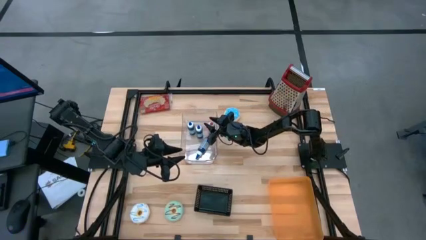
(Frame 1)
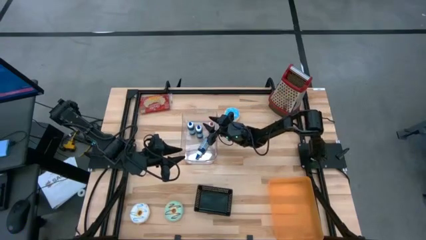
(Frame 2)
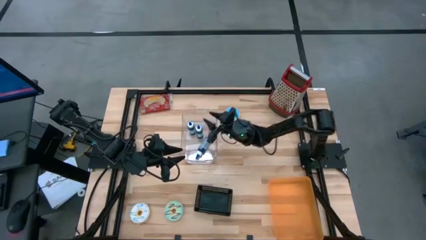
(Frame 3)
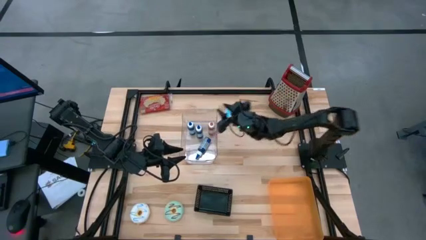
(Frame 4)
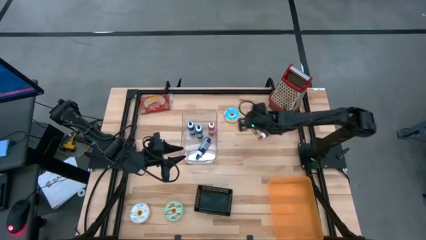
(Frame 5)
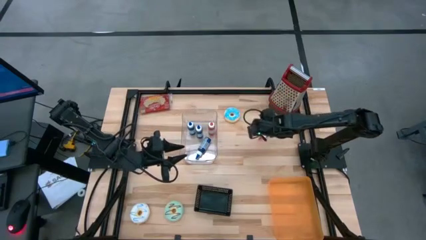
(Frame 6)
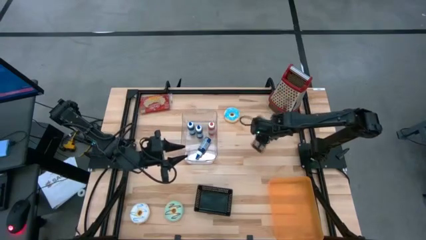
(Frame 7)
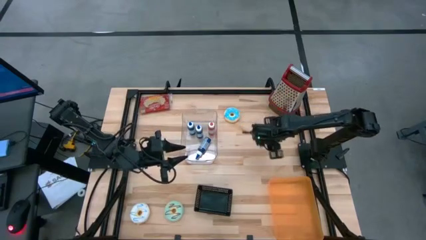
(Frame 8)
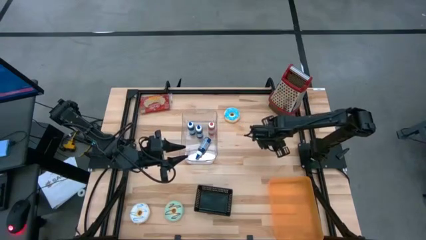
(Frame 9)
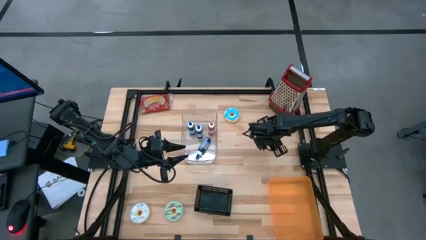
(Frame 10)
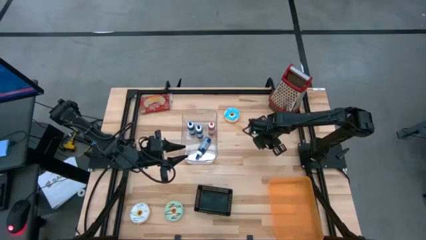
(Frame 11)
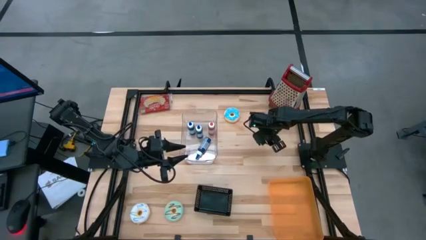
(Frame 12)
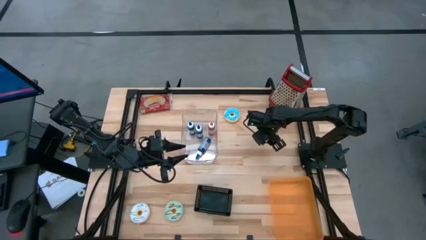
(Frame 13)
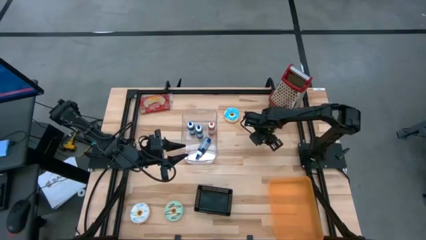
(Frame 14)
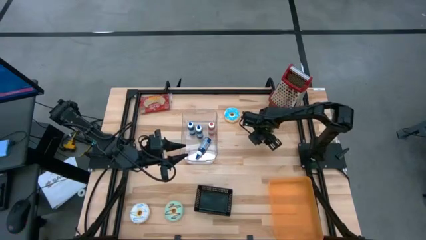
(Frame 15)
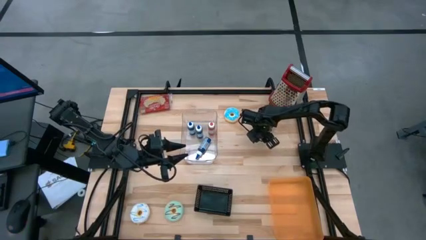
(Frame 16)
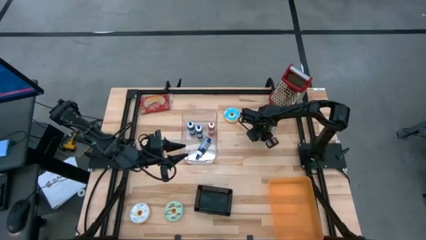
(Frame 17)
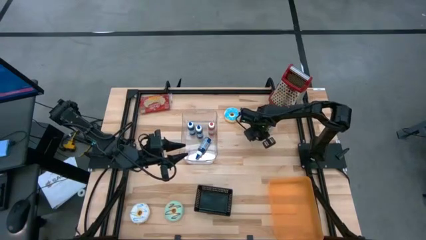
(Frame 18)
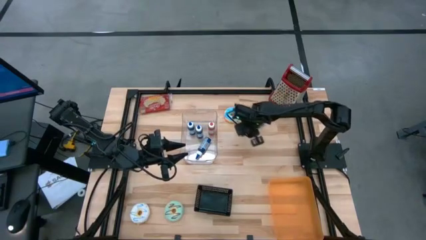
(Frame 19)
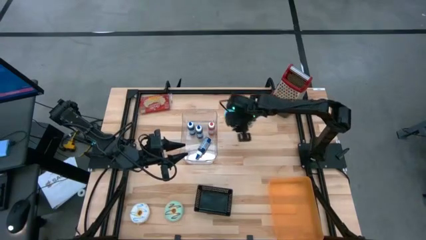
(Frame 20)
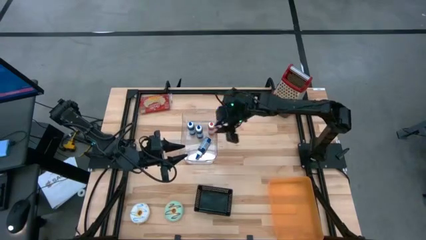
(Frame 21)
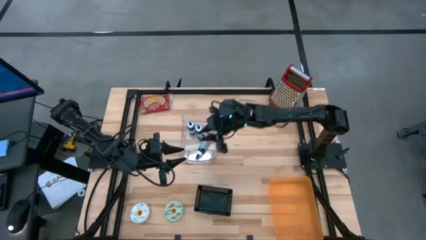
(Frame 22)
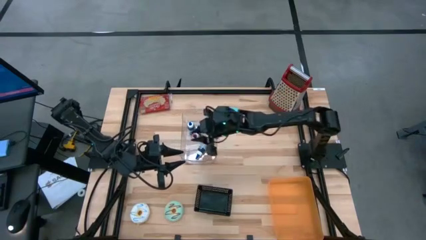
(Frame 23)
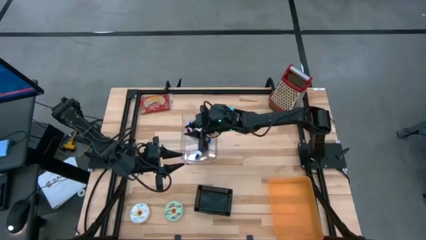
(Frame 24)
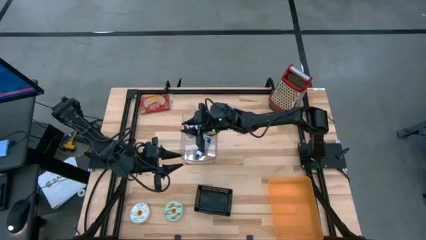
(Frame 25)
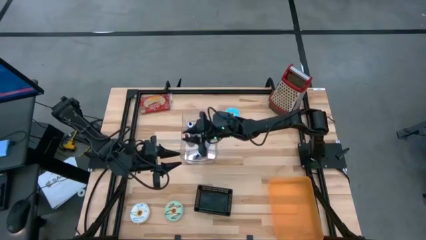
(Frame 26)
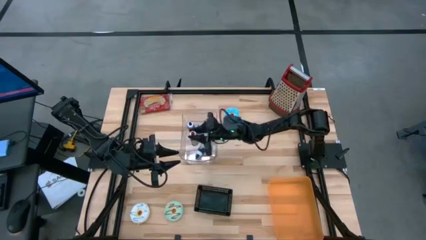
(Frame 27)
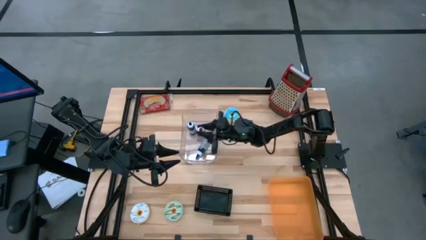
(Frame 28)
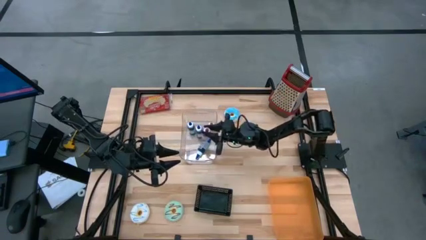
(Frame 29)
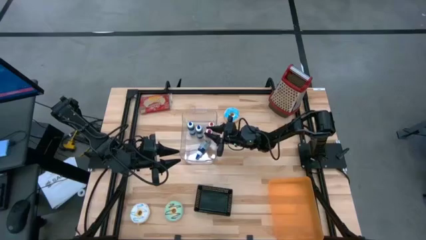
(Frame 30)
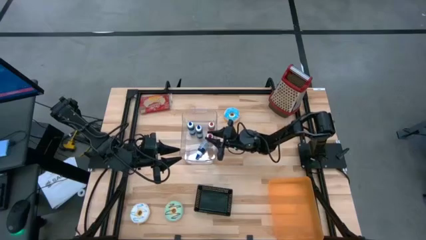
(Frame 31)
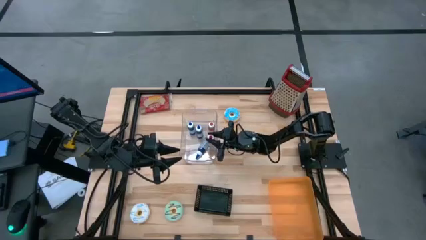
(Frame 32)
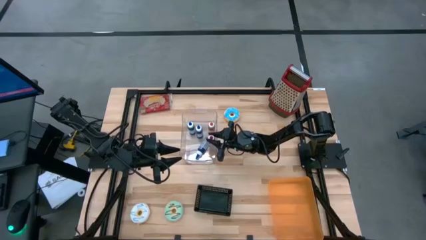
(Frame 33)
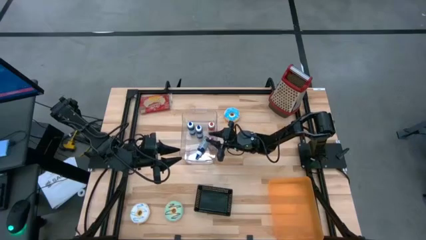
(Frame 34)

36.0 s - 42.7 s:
Put the red food coloring bottle into the transparent bin

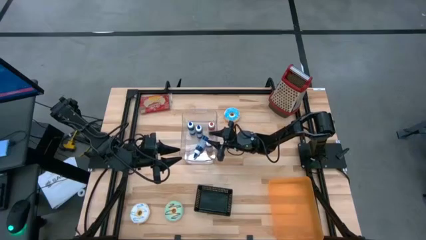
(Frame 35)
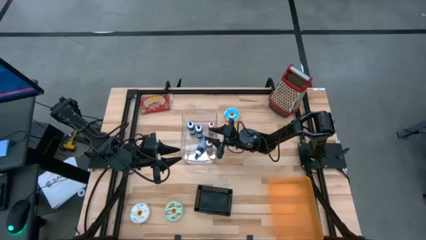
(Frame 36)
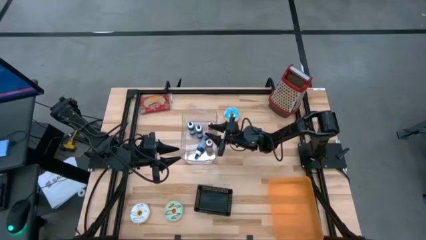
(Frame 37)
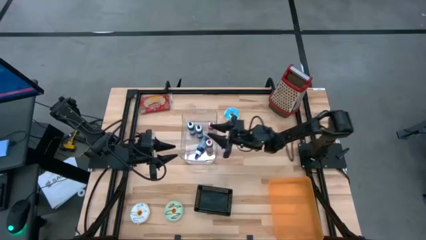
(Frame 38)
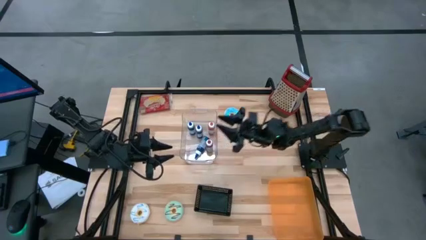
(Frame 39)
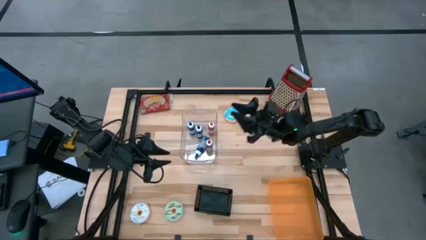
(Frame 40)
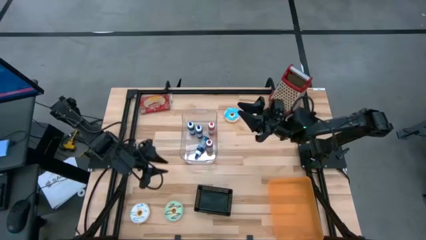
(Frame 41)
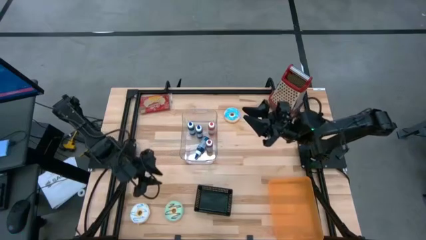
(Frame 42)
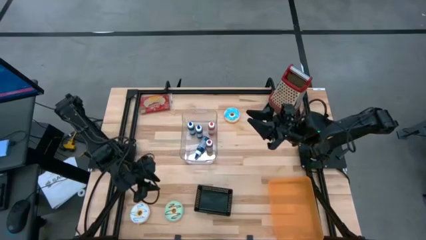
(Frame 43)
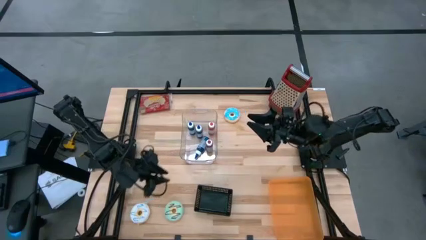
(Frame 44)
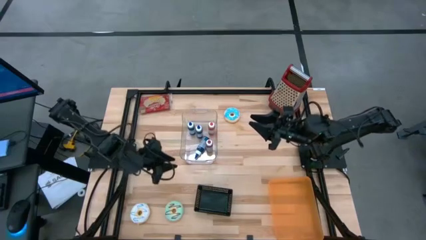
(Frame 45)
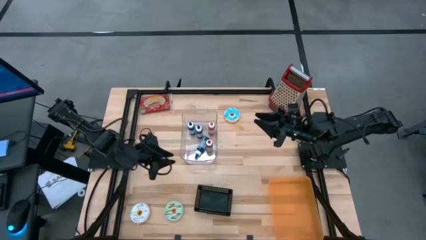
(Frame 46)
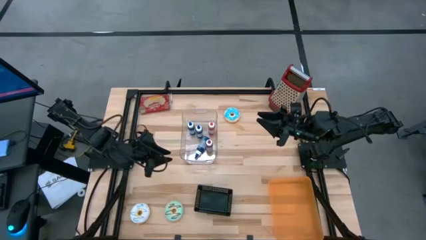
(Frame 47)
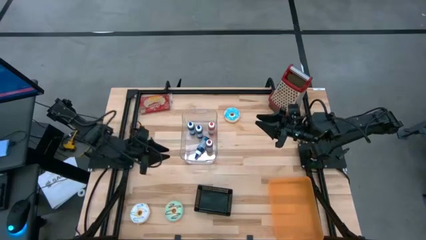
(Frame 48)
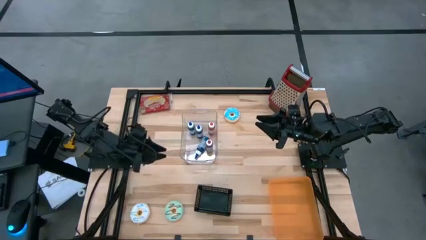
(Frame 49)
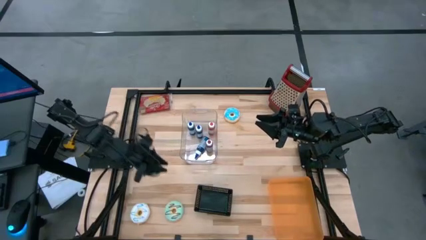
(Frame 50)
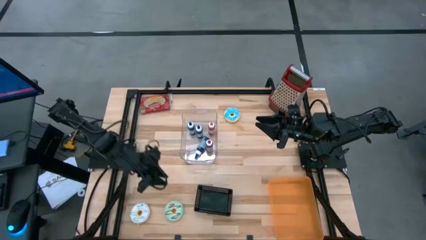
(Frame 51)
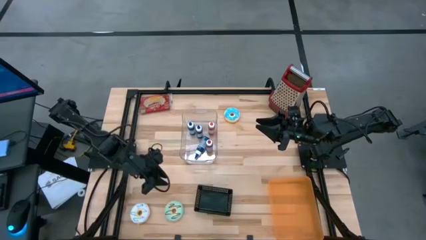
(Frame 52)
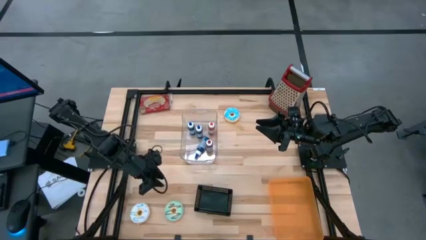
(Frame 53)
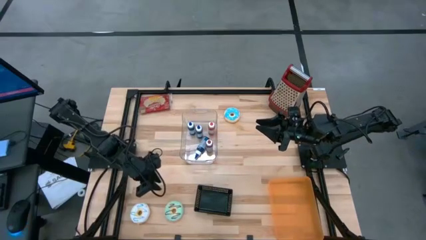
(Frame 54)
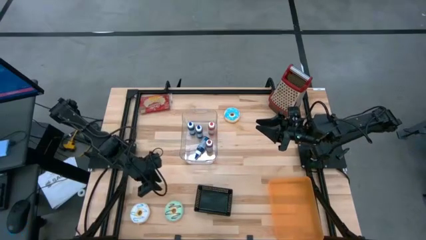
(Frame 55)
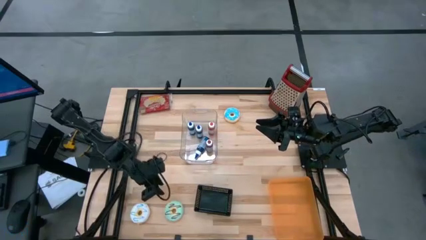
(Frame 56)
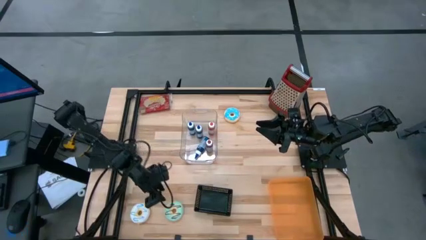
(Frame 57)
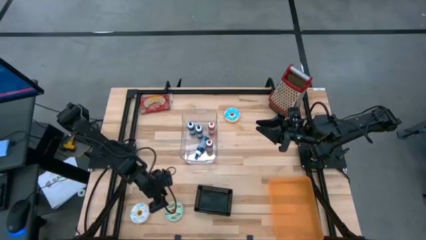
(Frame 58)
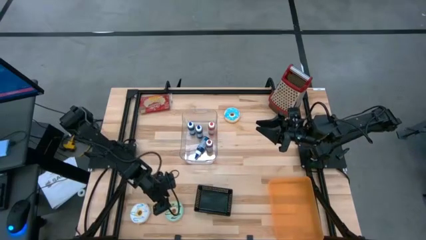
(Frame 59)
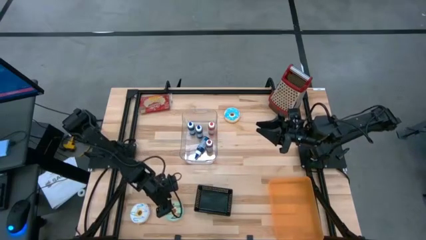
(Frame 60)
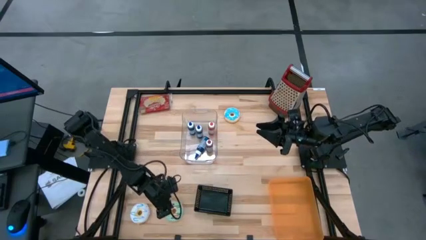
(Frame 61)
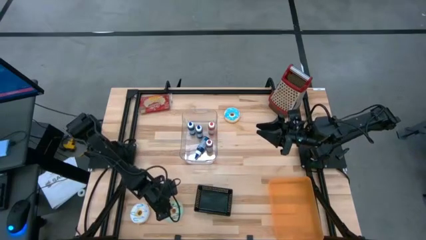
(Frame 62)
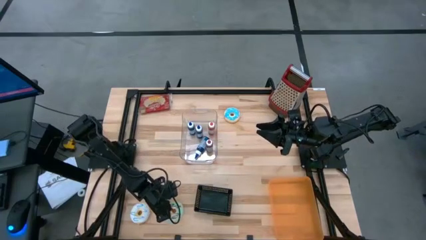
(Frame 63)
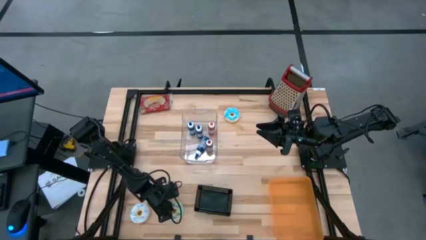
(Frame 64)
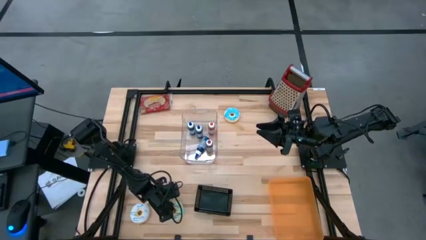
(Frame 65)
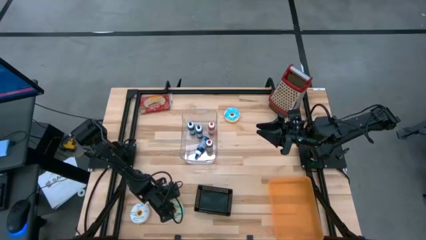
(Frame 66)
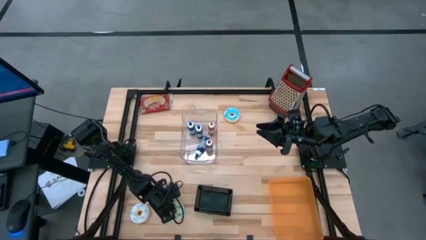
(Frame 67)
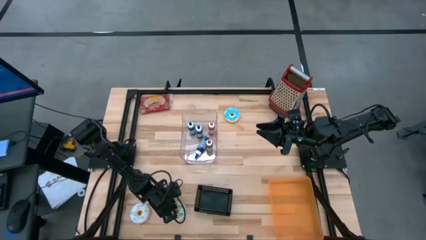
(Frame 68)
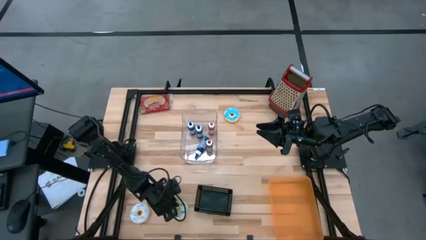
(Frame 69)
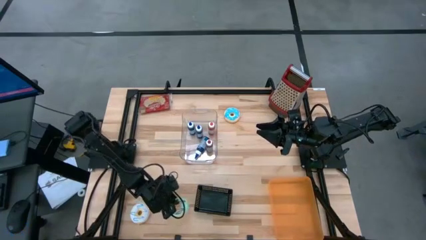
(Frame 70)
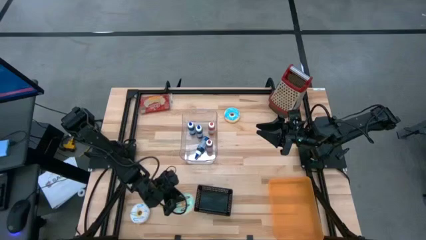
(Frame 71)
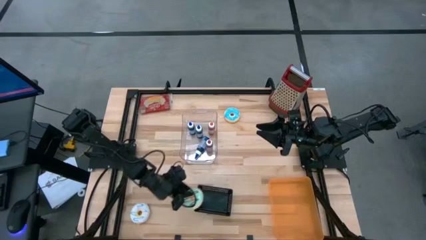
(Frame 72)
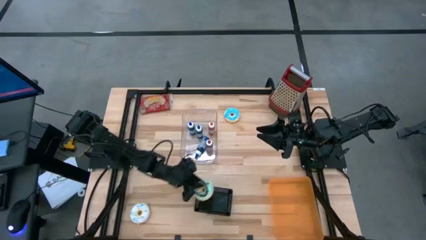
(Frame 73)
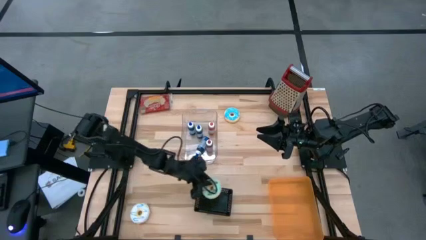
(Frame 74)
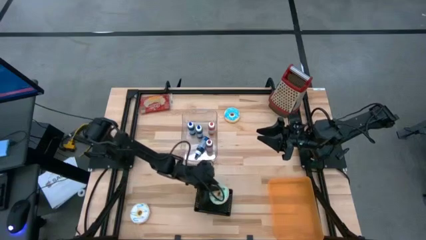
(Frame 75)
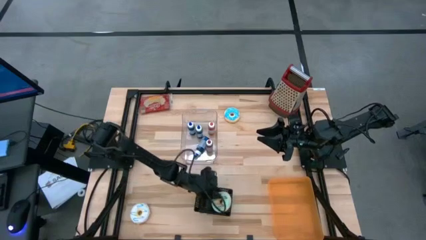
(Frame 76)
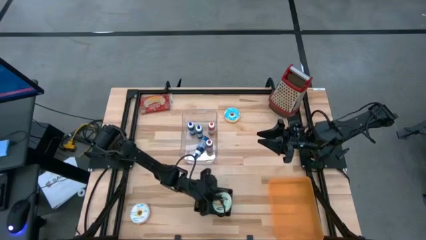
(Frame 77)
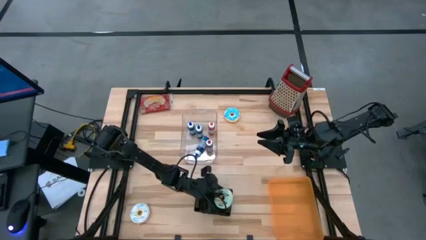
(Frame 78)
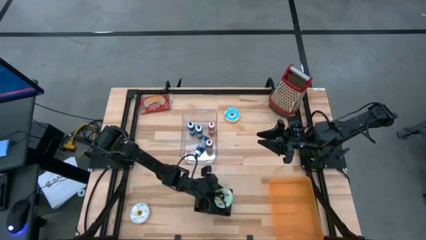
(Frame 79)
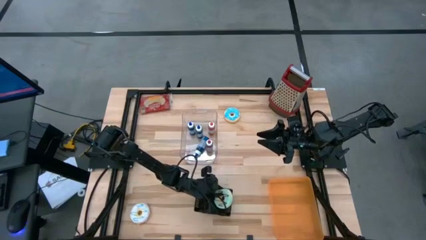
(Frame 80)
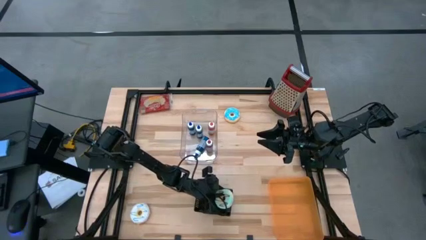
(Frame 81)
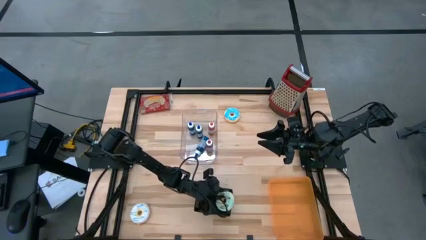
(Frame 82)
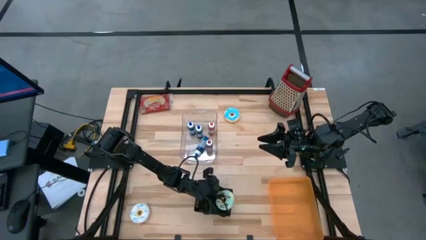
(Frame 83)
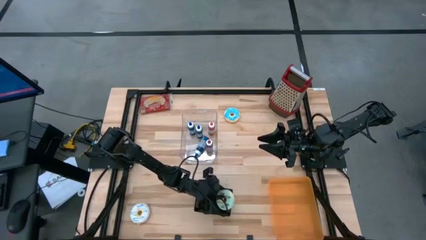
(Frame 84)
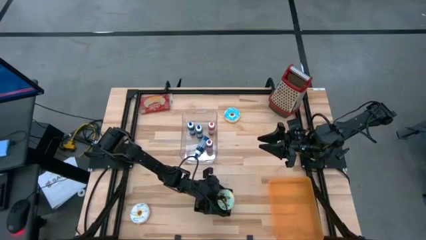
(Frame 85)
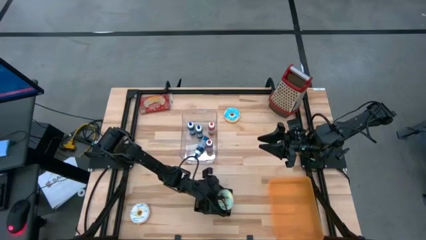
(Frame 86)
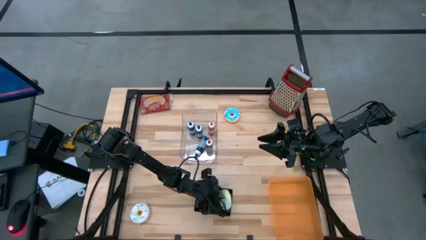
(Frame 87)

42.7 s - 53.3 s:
Put the green donut into the black bin
